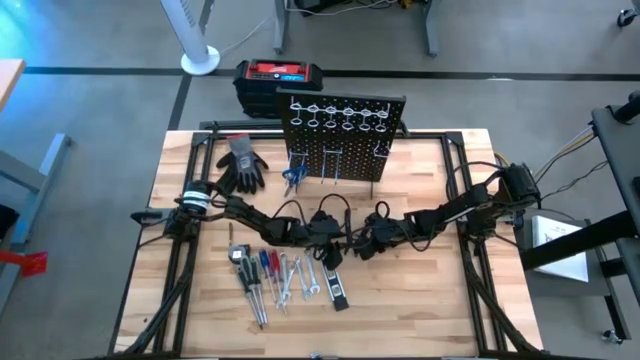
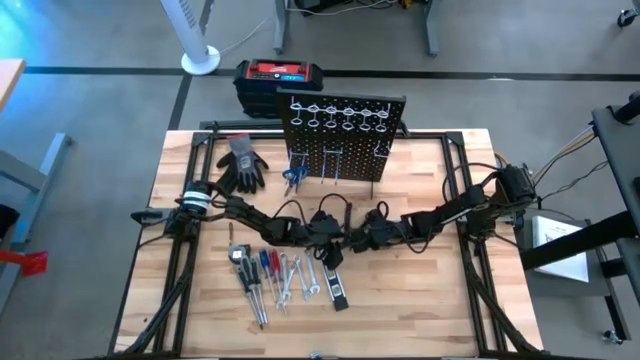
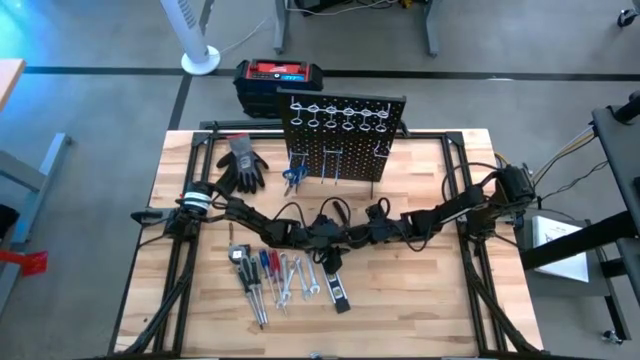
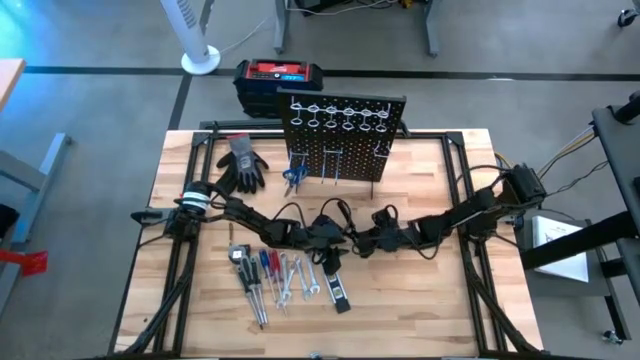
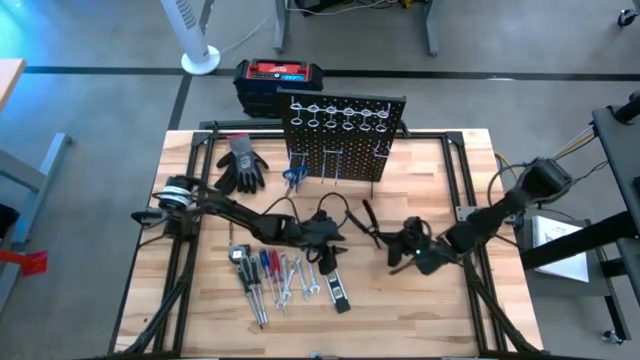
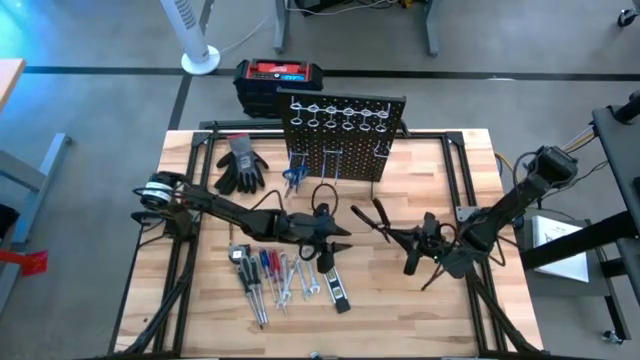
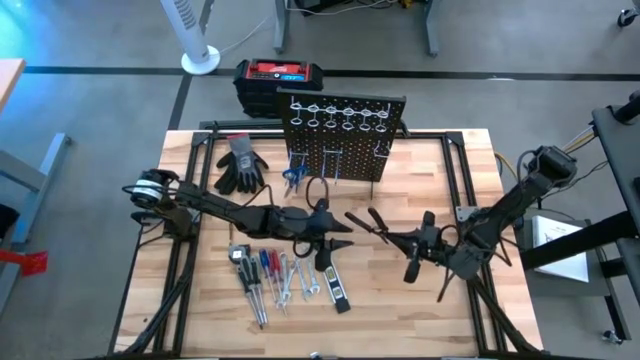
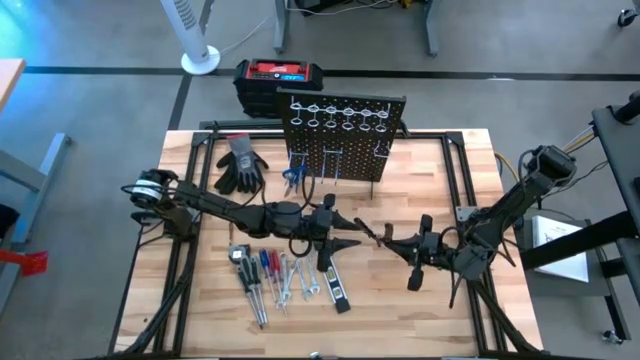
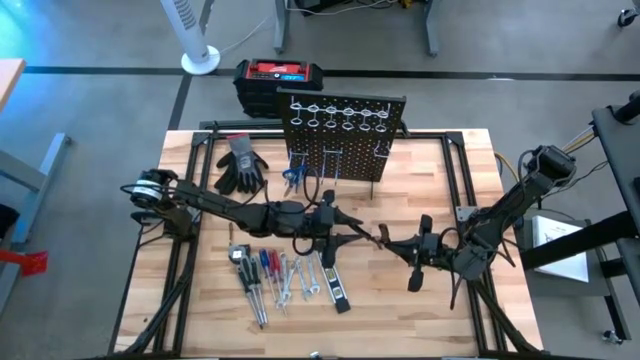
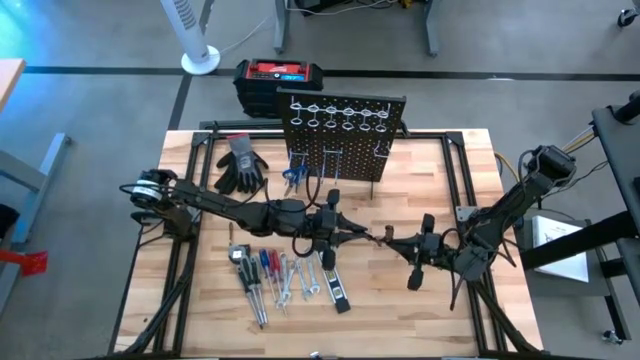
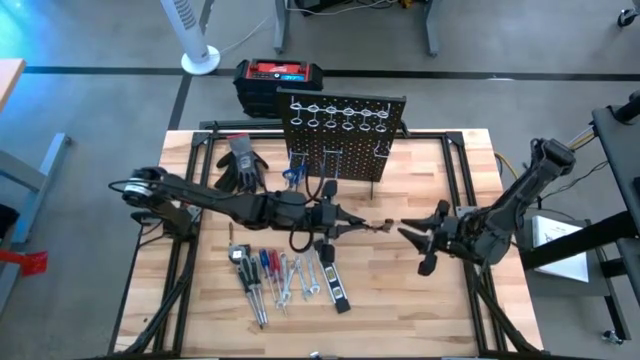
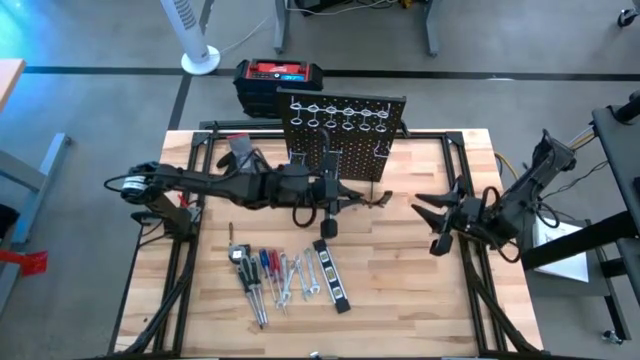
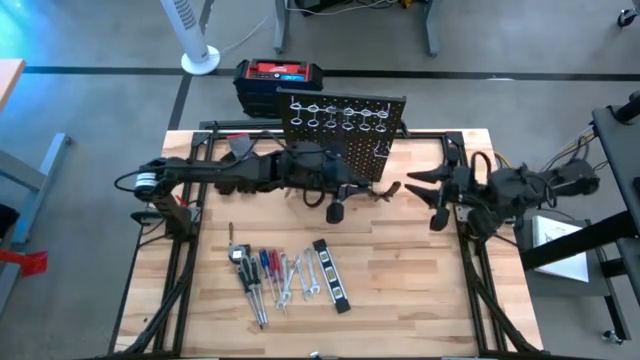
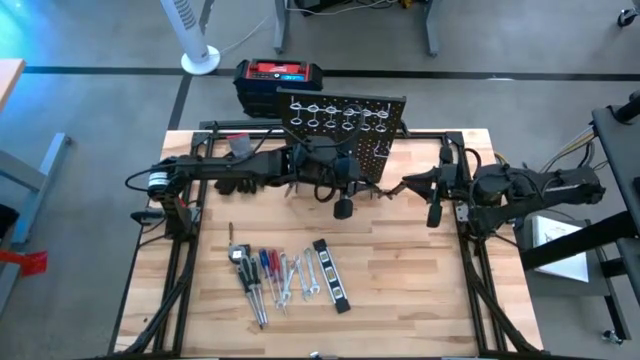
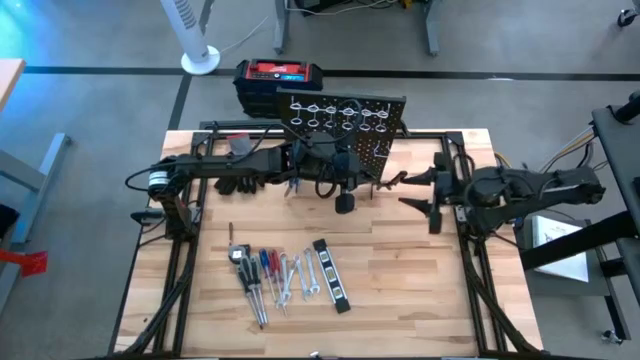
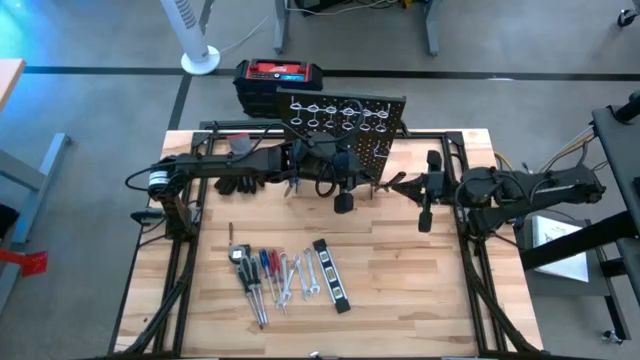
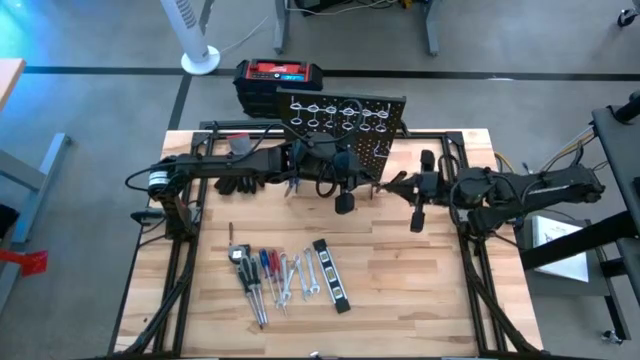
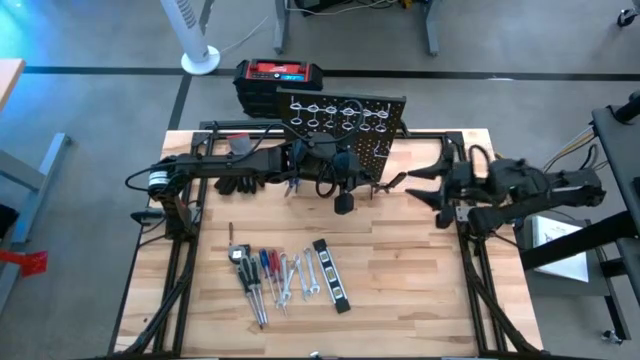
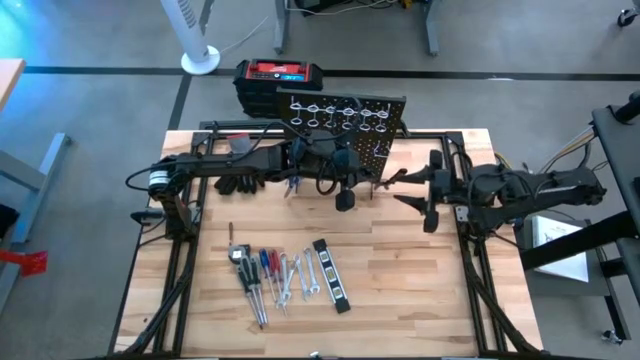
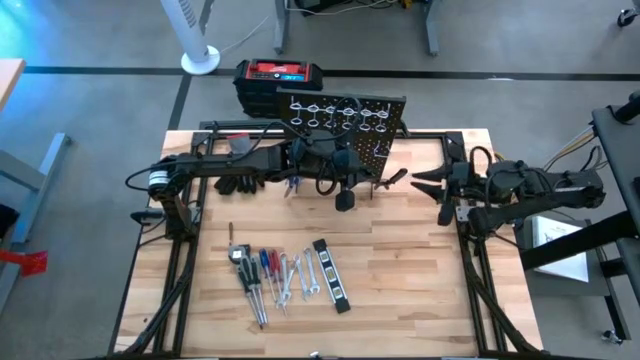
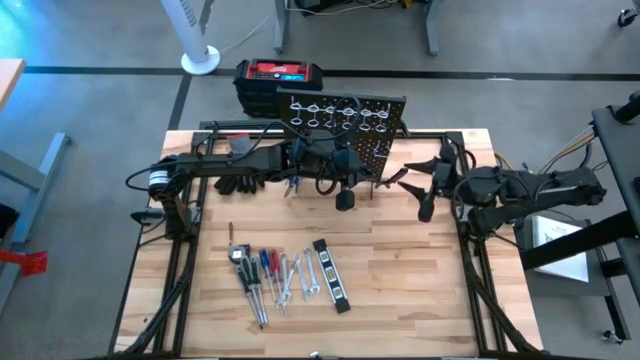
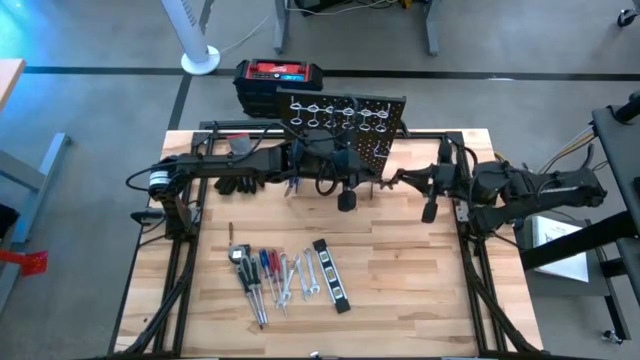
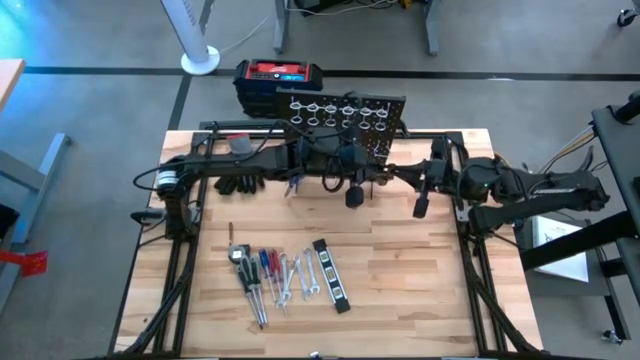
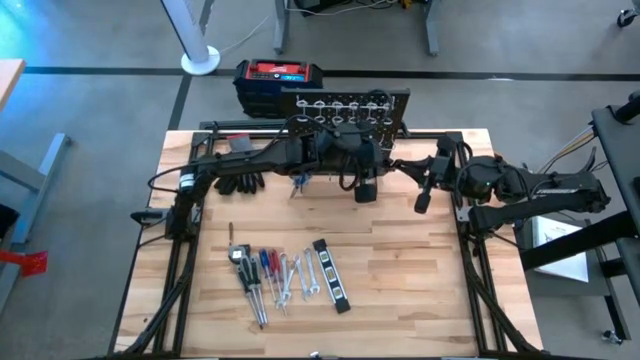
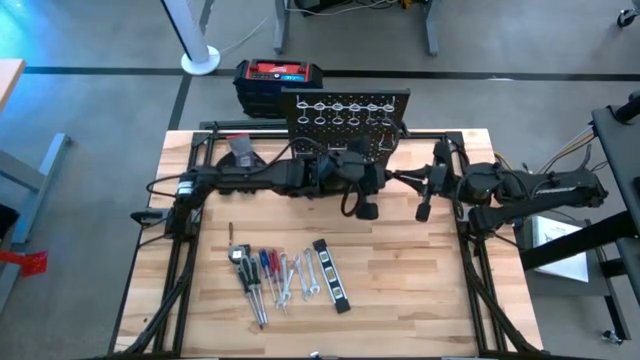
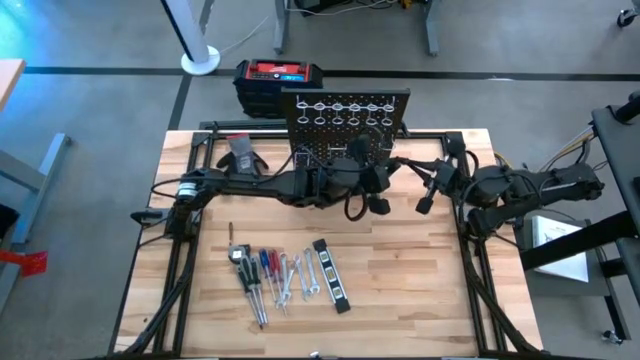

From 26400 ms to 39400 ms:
Task: Hang tools onto peg board
Hang the black stripping pliers on the peg board

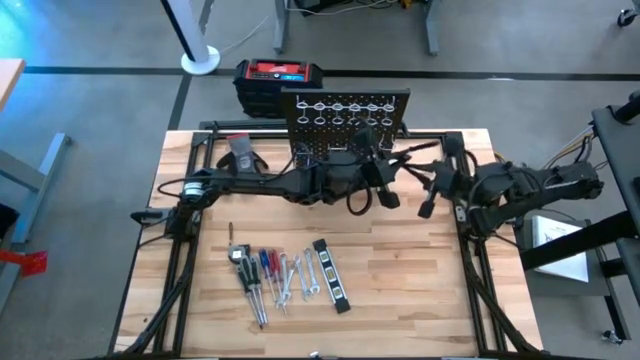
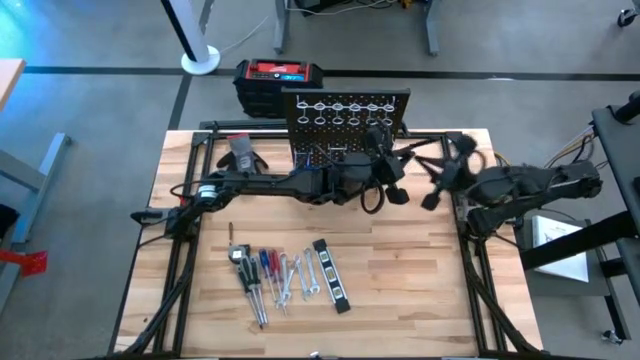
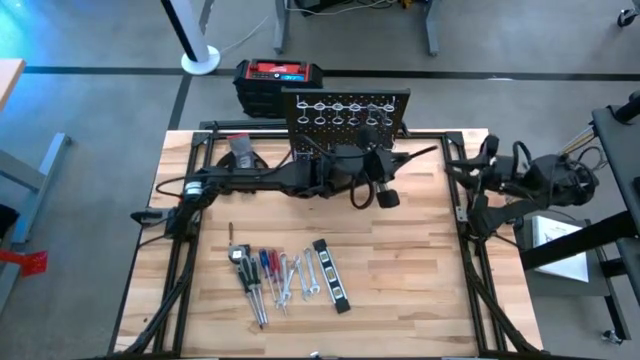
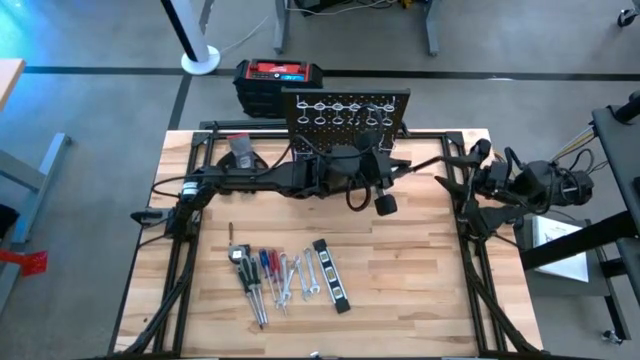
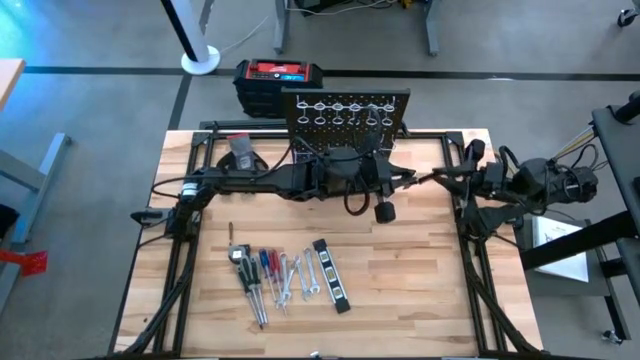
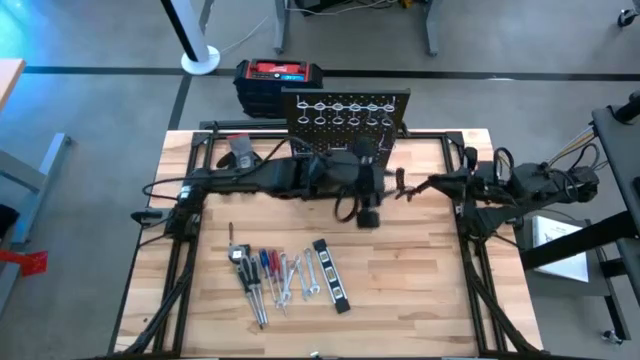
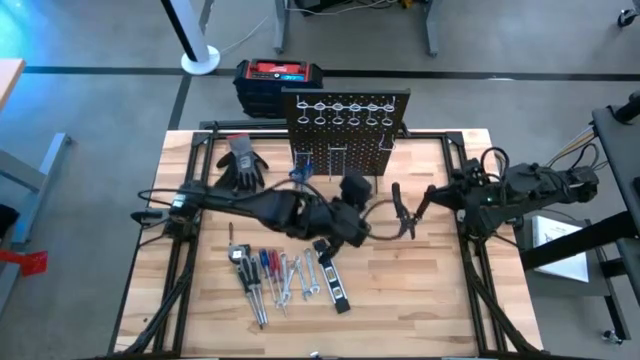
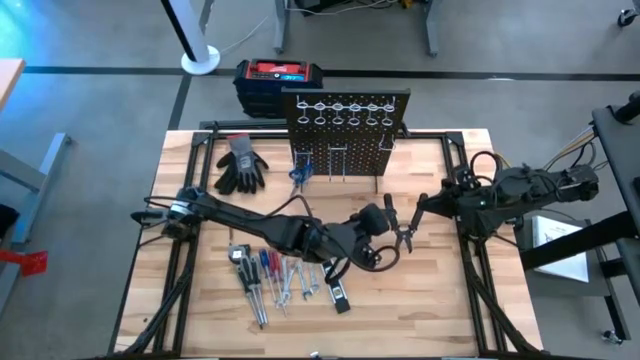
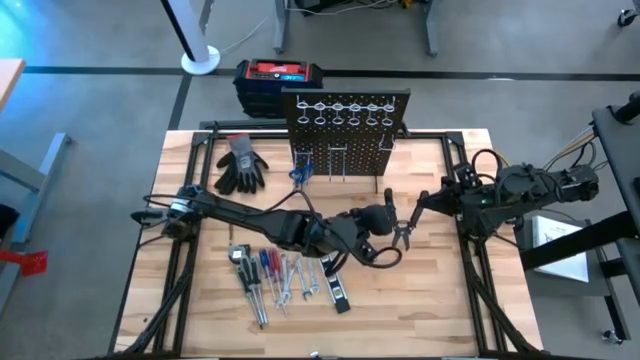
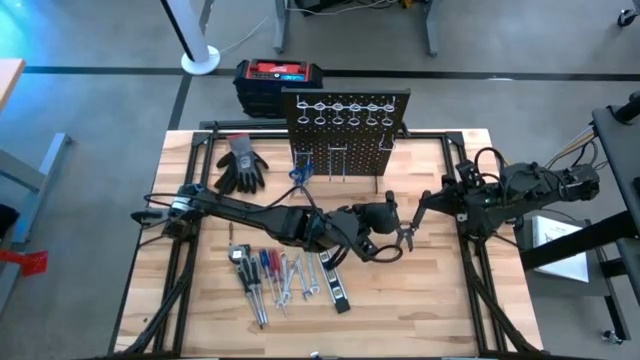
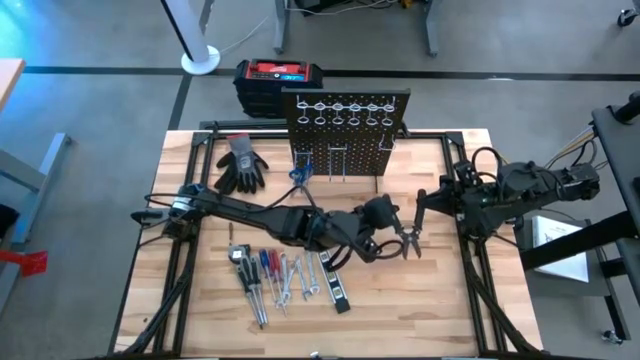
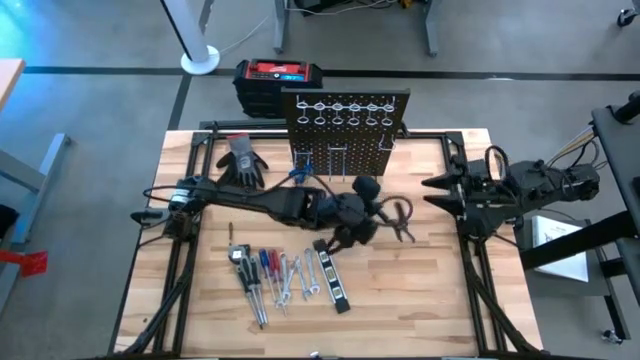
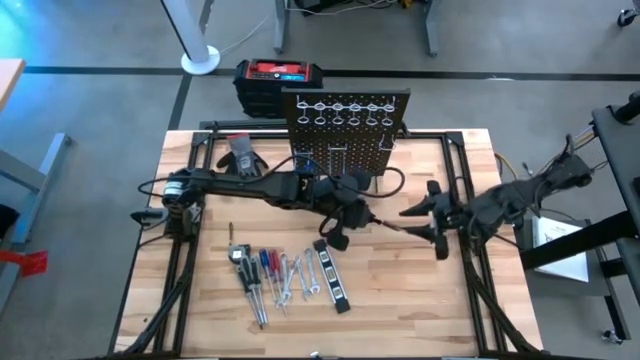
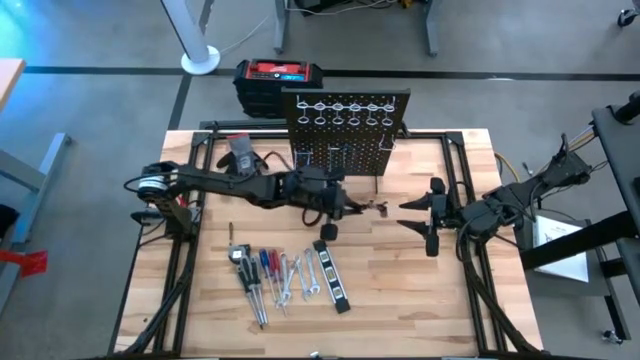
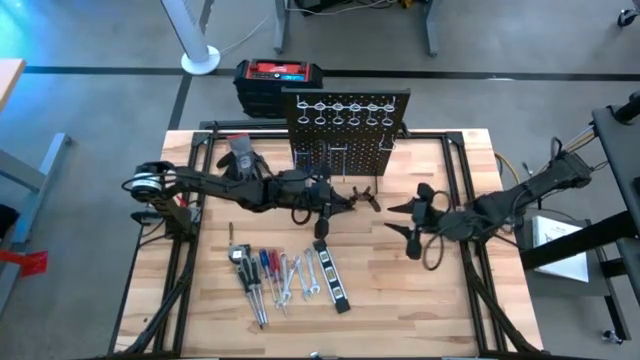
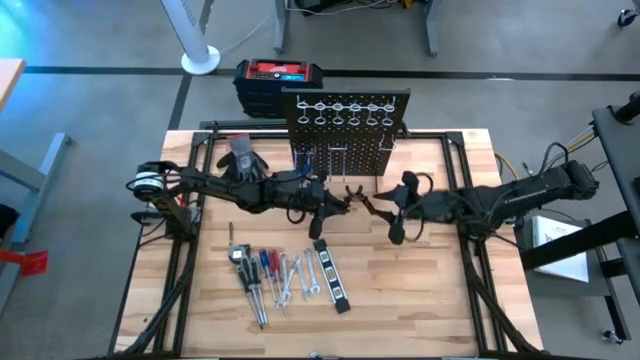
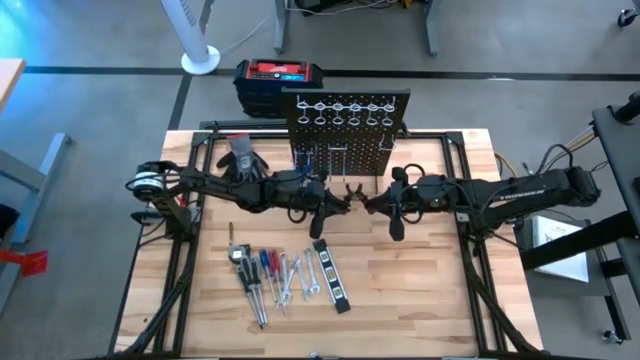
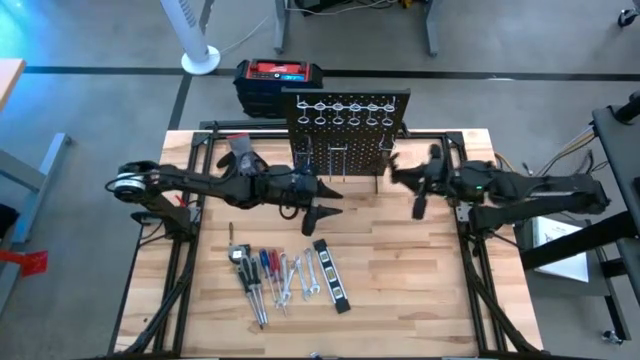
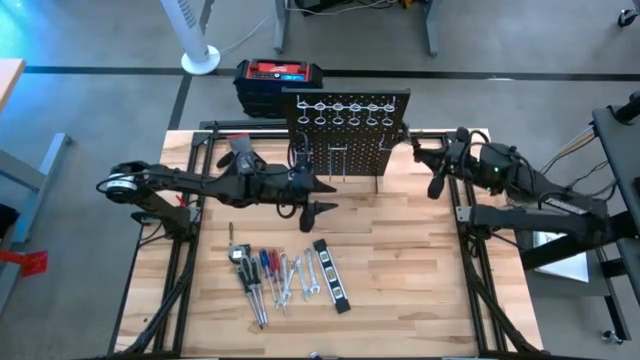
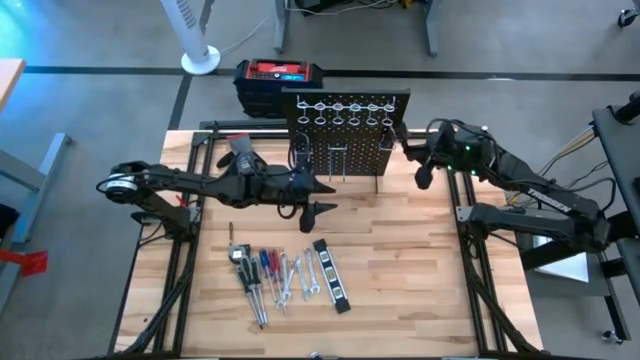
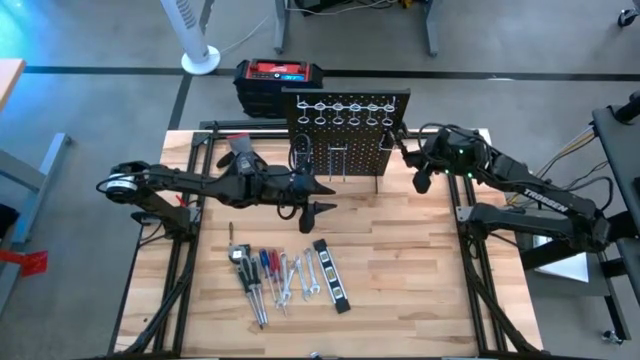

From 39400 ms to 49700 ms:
Hang the black stripping pliers on the peg board
